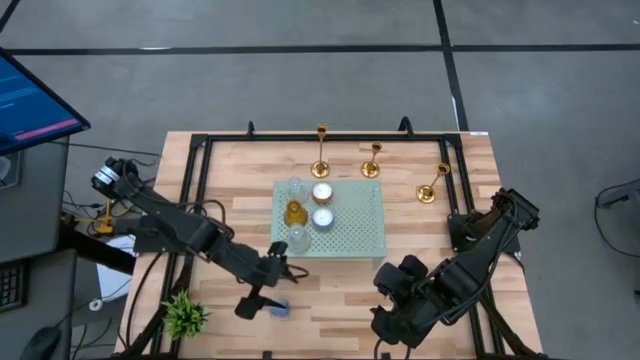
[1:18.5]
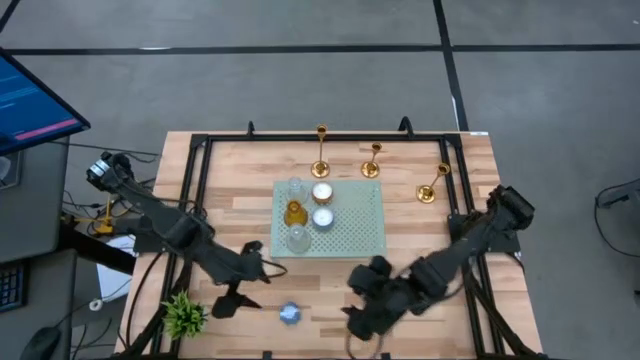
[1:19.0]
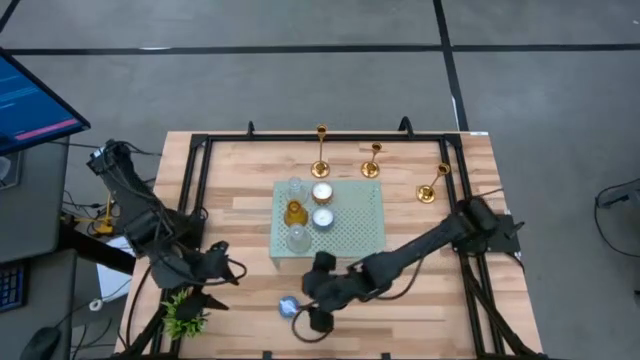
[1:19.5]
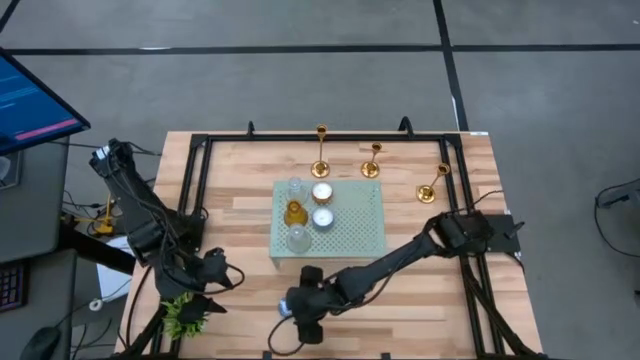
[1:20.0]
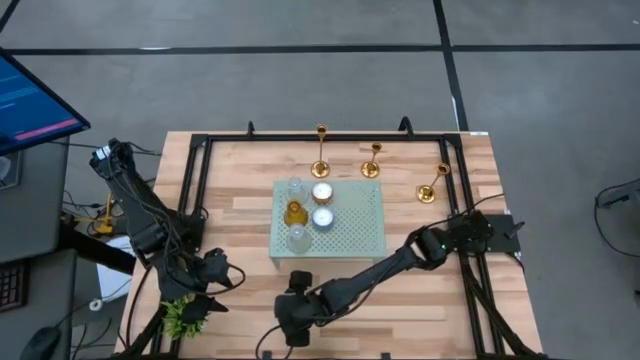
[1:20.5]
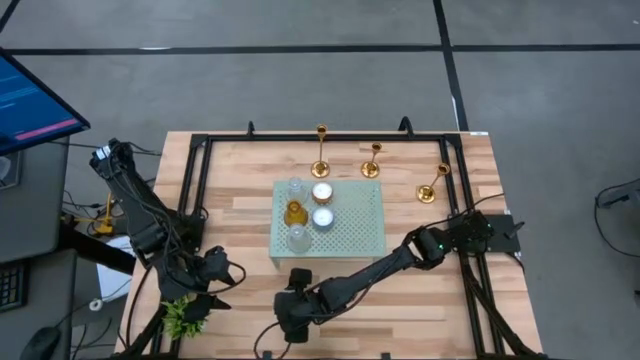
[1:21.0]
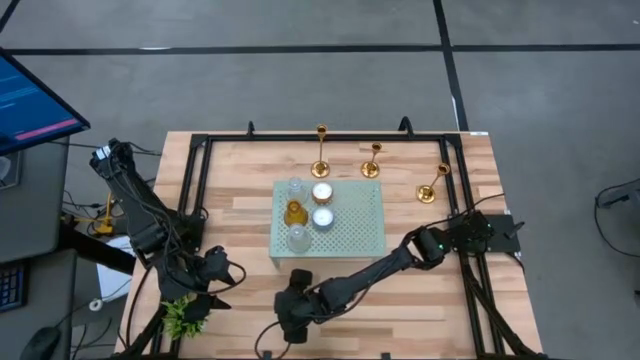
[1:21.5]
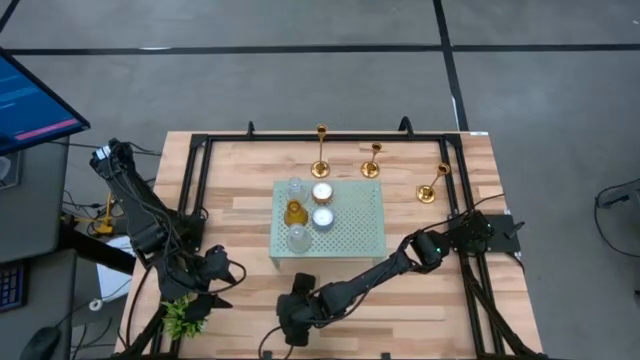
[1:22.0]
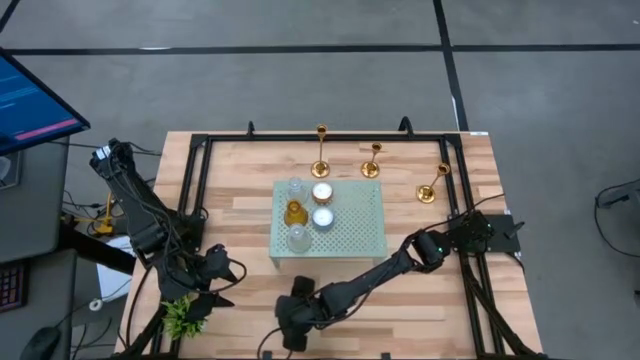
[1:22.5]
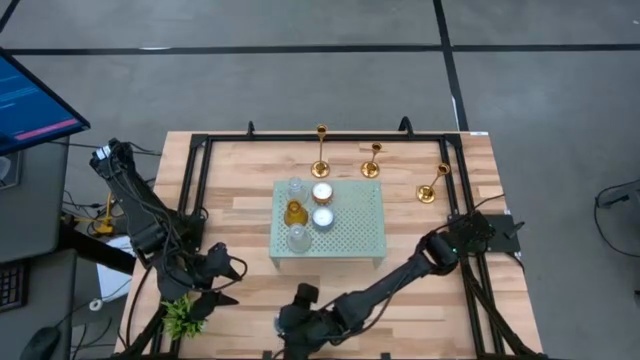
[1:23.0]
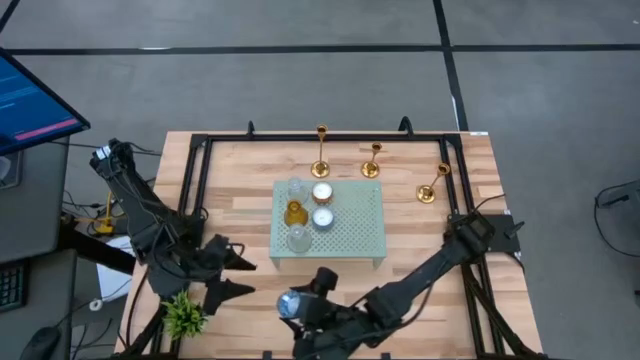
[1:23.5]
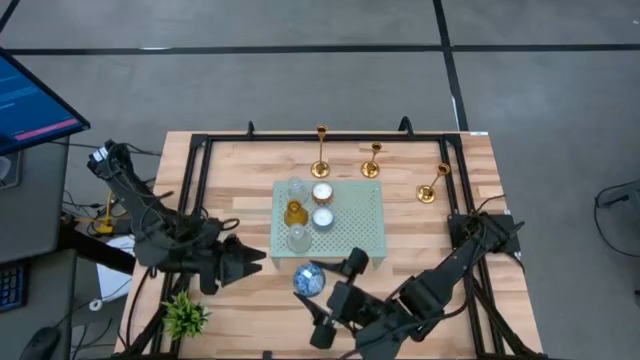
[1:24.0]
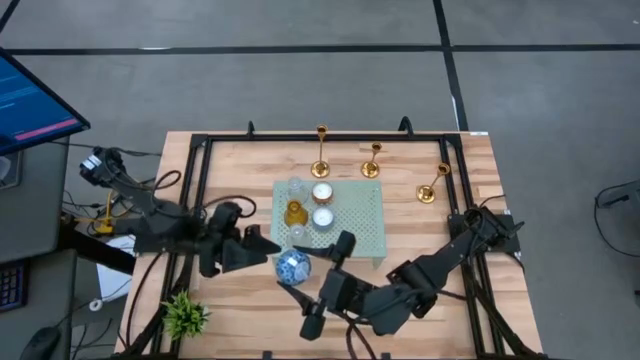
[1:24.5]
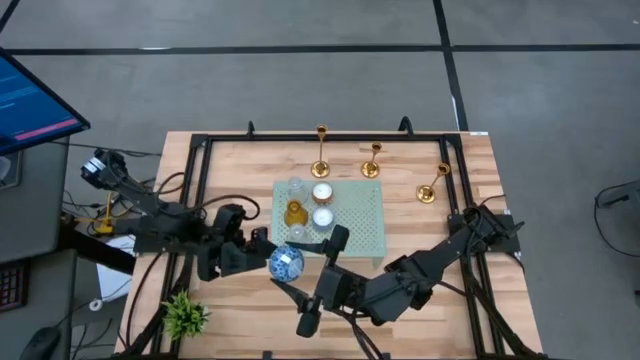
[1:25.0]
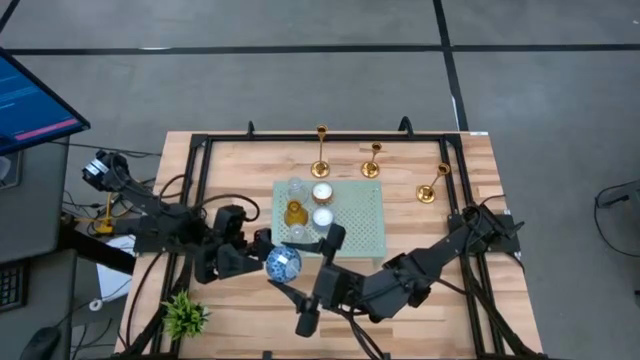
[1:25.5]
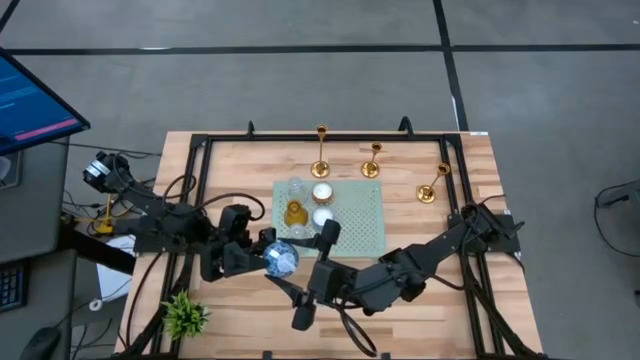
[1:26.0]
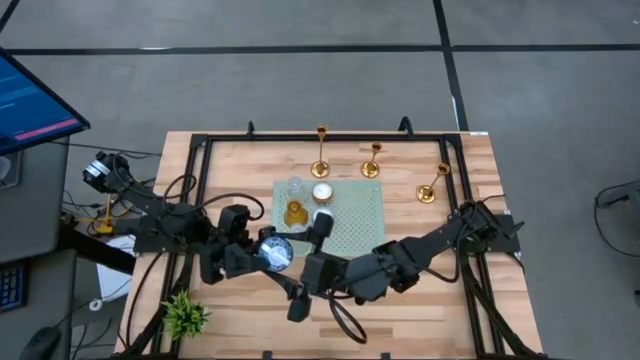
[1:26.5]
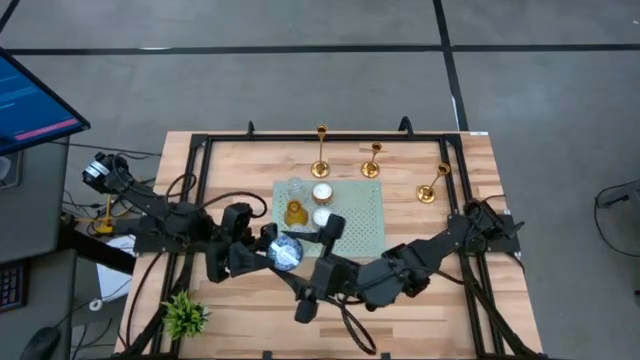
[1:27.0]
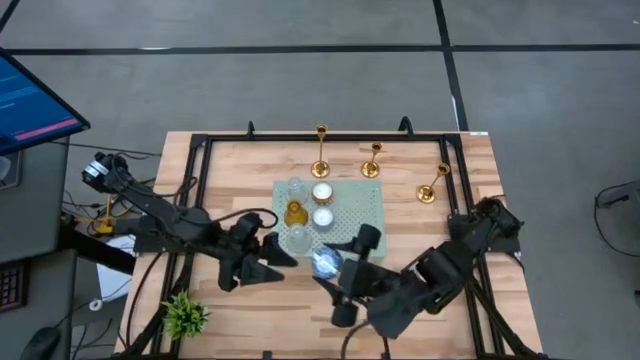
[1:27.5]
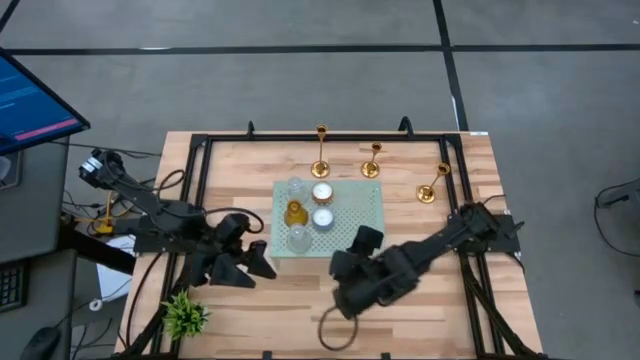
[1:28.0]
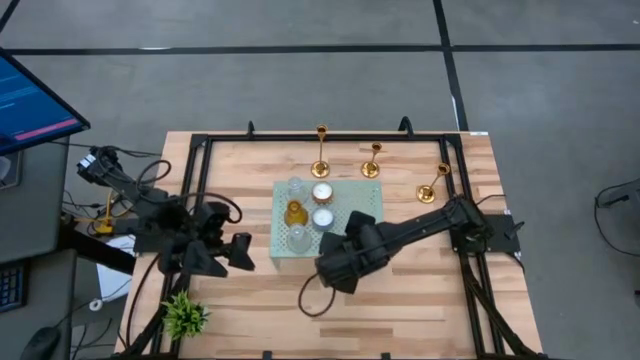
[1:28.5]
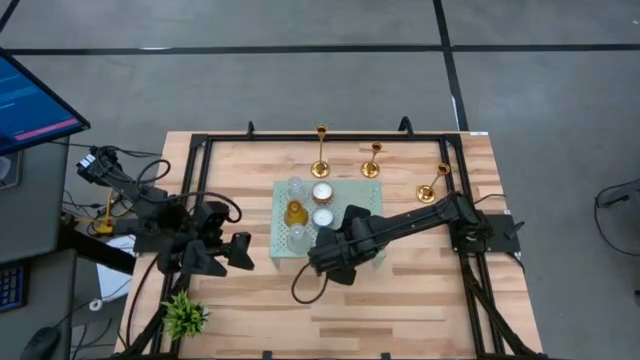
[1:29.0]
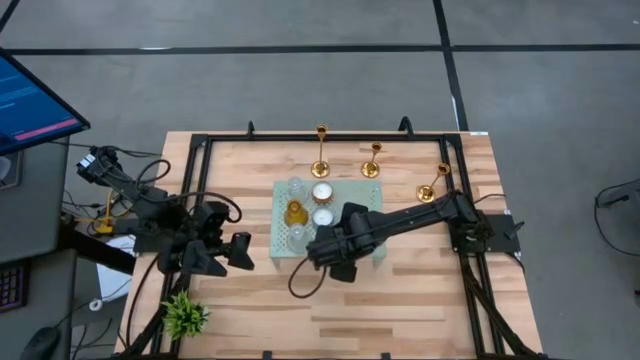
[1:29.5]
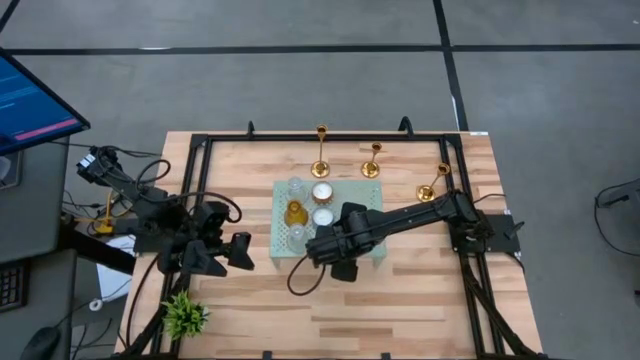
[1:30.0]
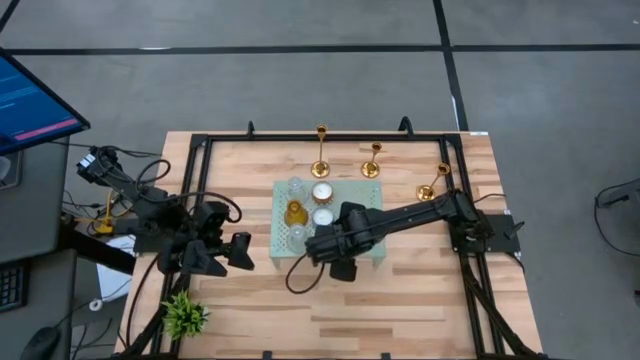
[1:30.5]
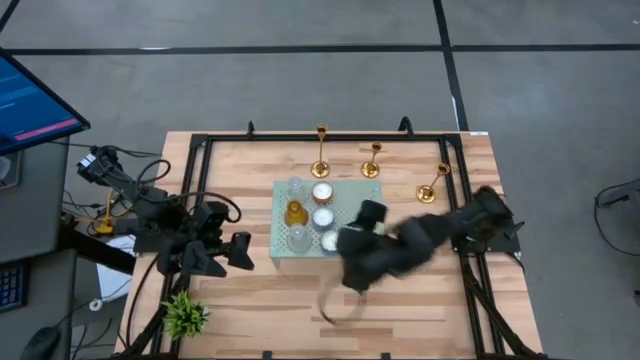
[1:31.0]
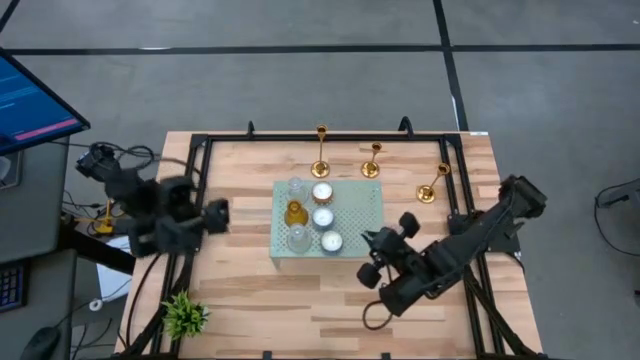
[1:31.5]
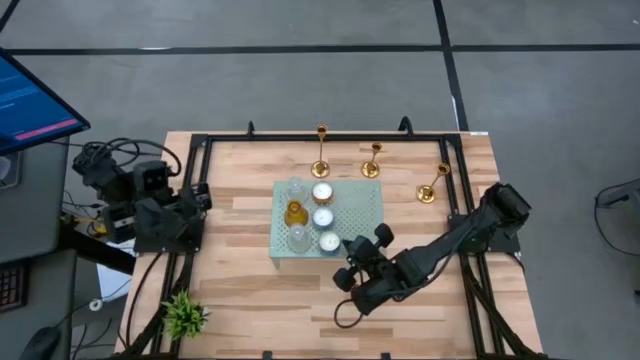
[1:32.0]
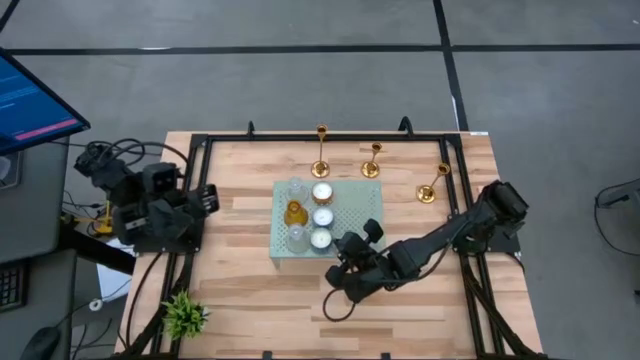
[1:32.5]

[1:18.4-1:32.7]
Task: Pick & Place candle stick holders
Align the blue scented candle with the other blue scented candle on the shelf

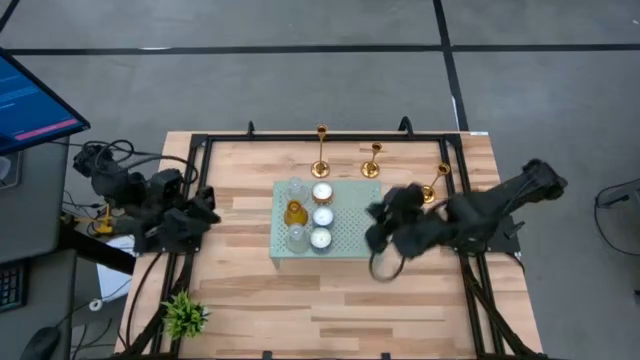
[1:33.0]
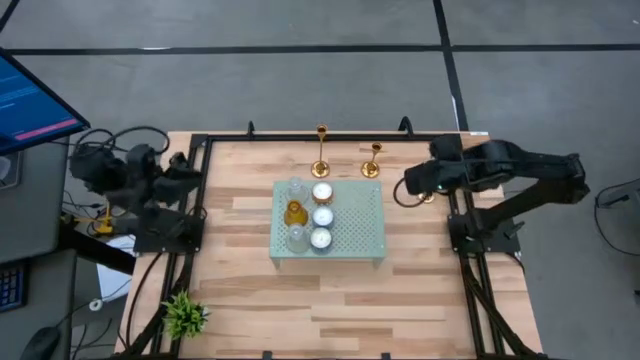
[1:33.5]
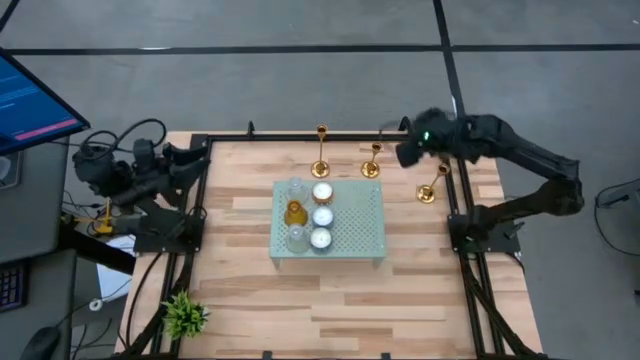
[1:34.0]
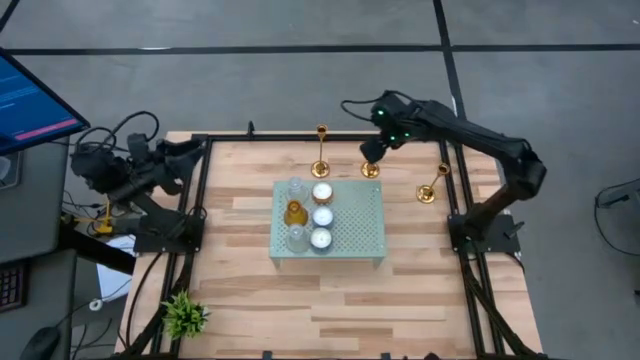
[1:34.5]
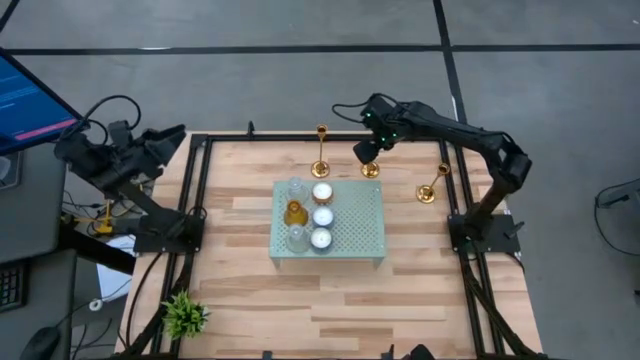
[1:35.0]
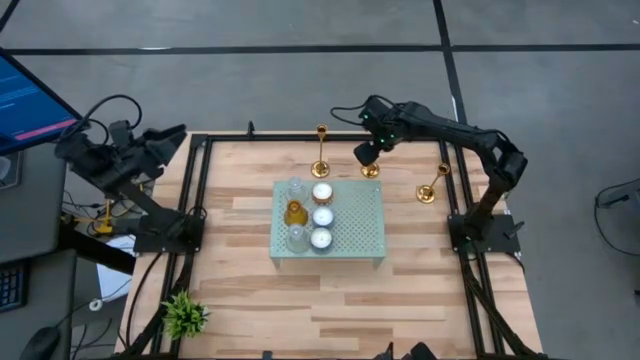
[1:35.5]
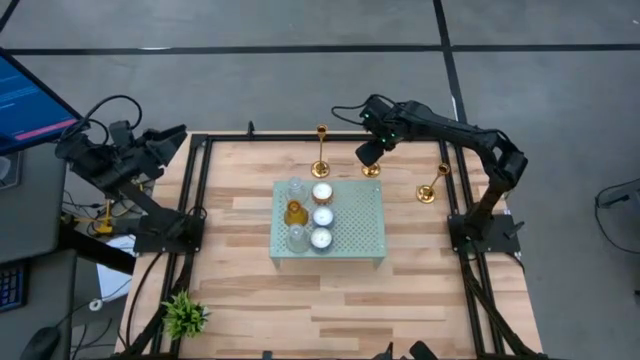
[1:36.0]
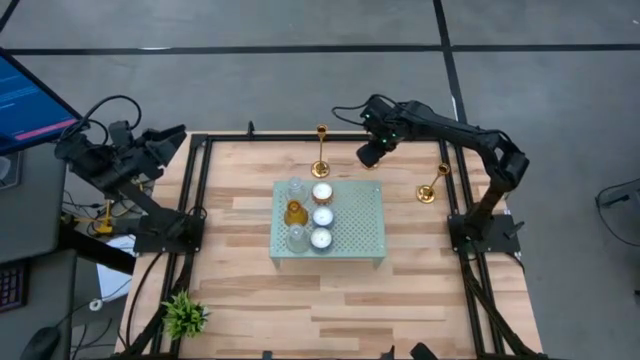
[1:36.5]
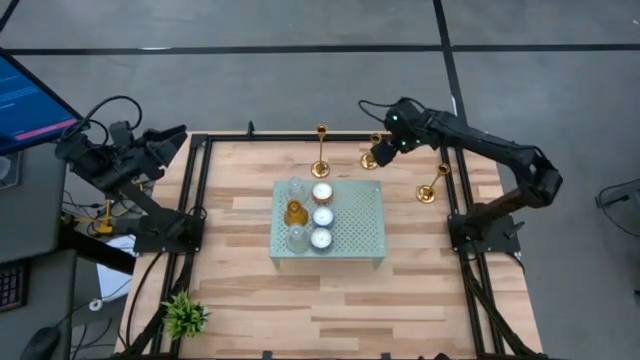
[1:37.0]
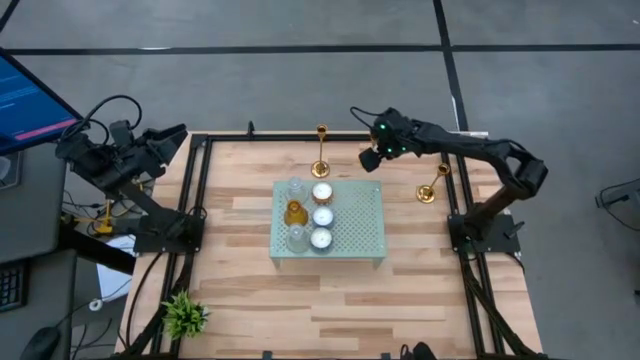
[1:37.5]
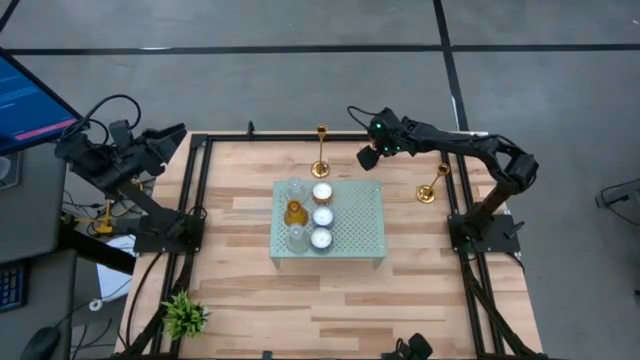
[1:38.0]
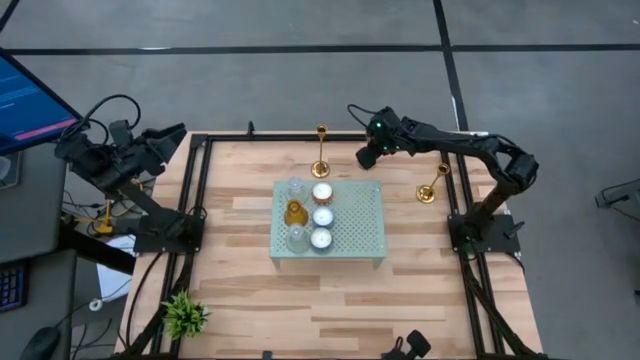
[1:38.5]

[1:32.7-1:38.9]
Put the middle gold candle holder on the shelf
